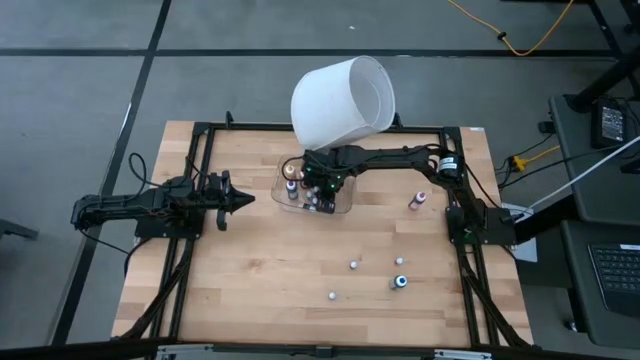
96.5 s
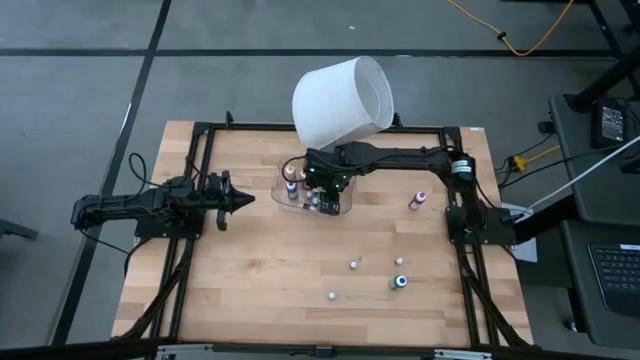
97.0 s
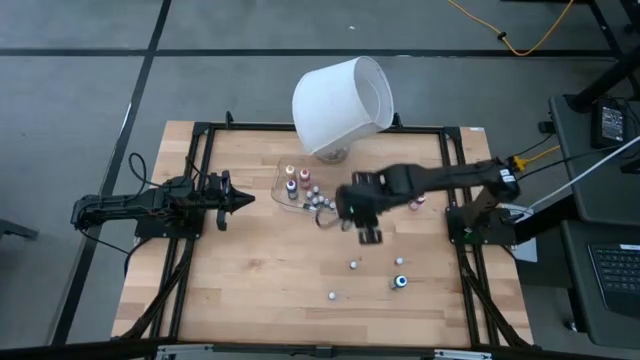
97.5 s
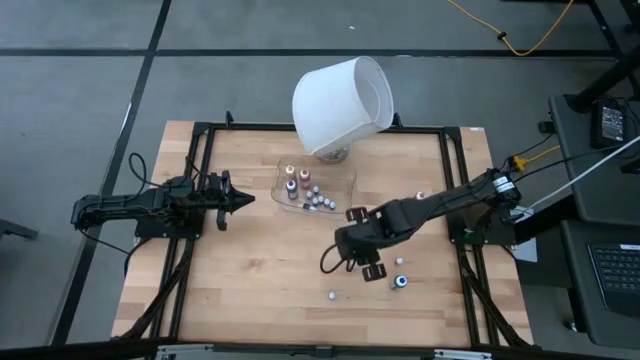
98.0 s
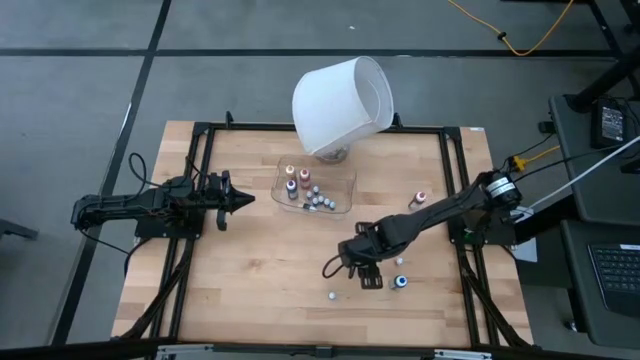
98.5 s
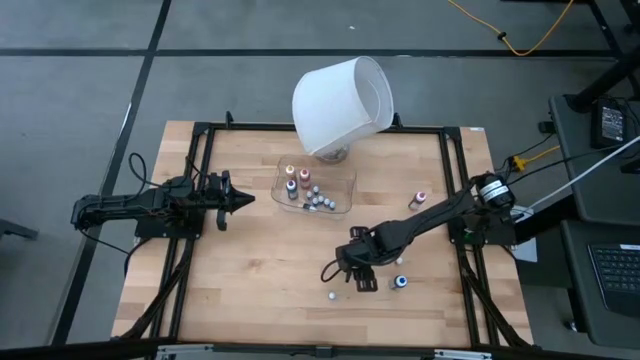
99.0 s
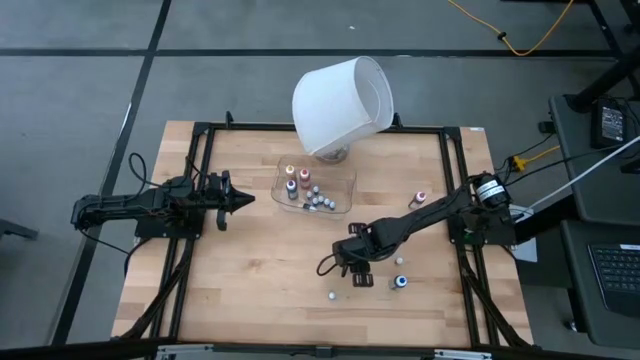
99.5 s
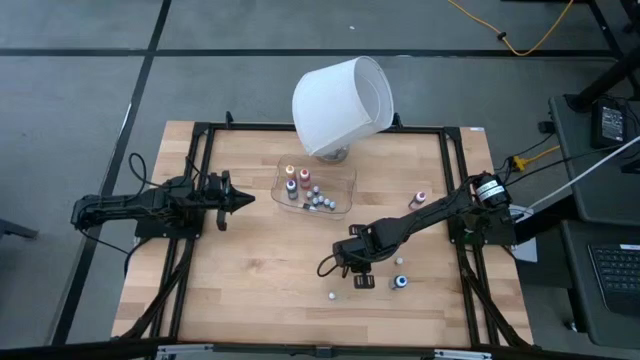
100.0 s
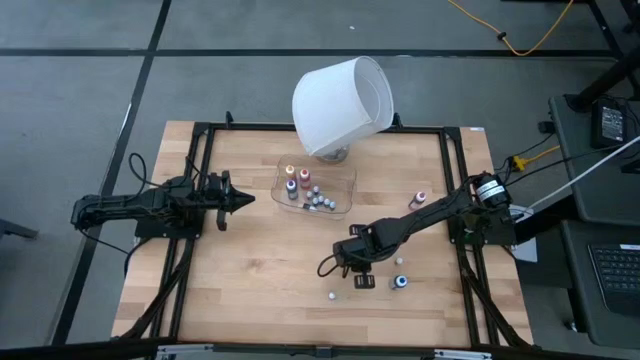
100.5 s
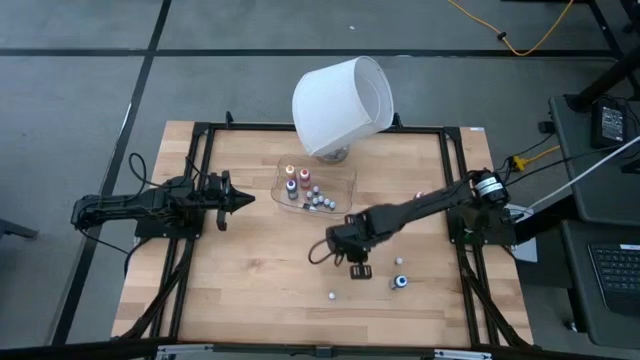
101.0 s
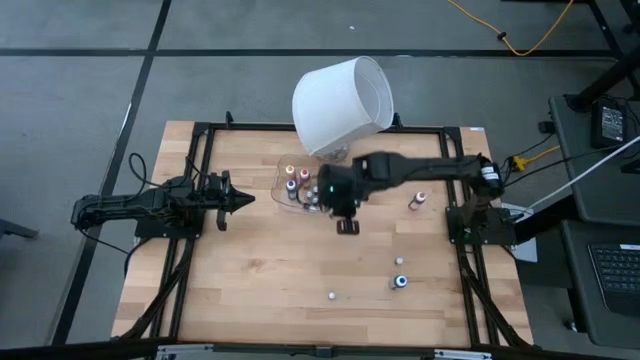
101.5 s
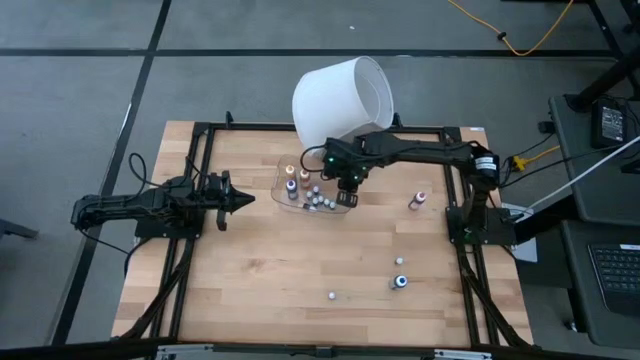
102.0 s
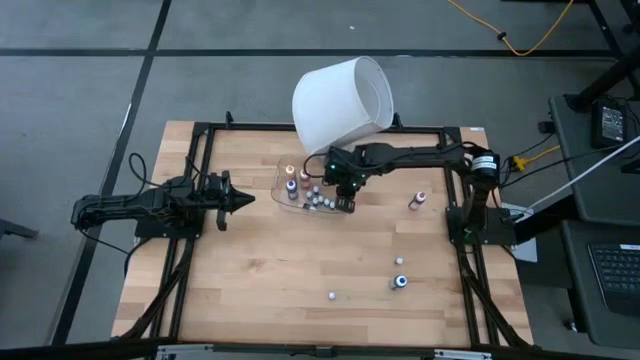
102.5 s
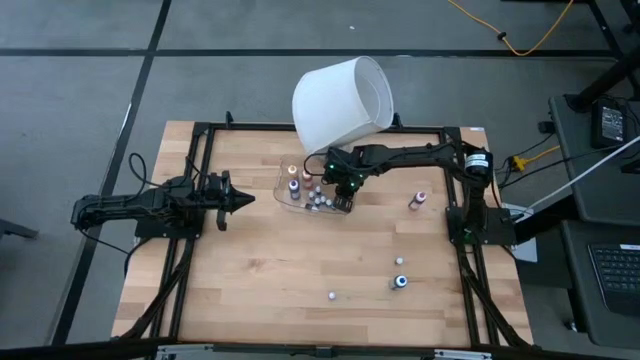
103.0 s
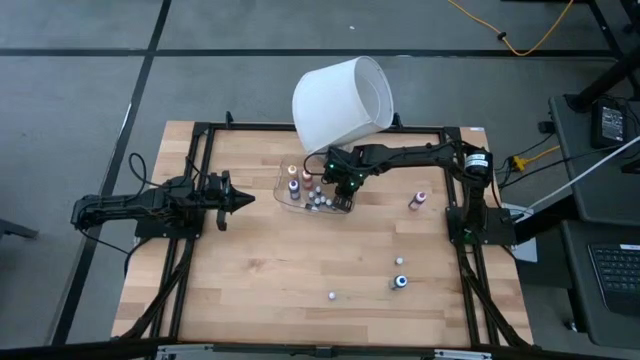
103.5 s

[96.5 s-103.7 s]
Task: Pick & Place food coloring
Put the left small red food coloring bottle into the container

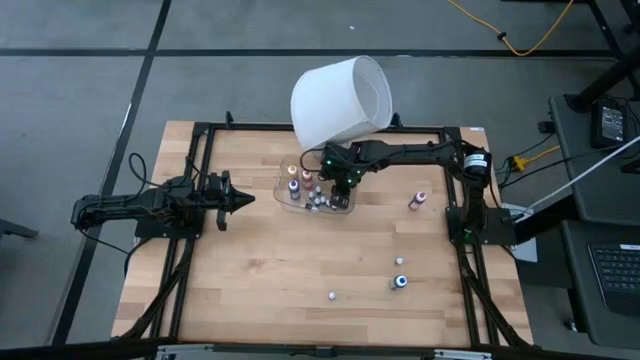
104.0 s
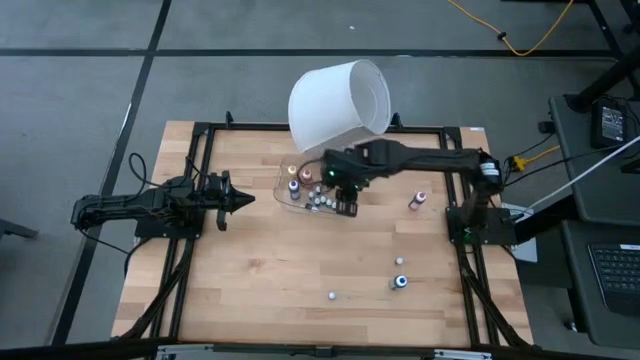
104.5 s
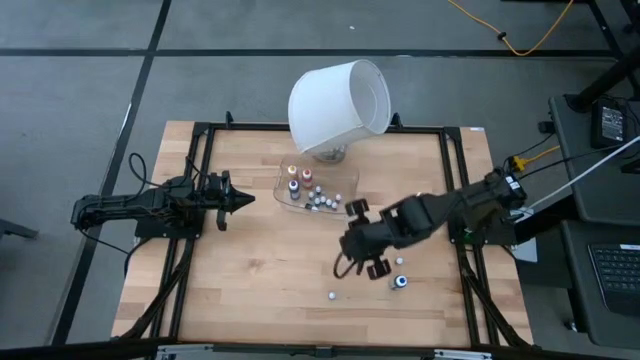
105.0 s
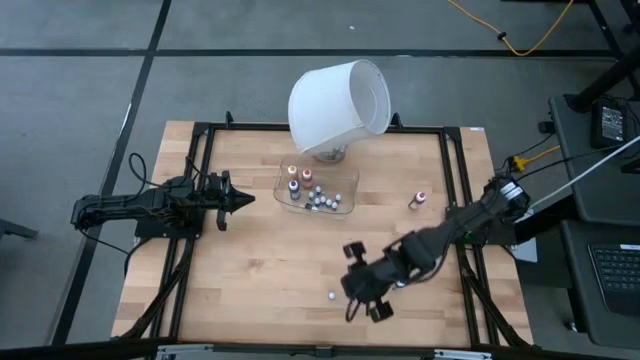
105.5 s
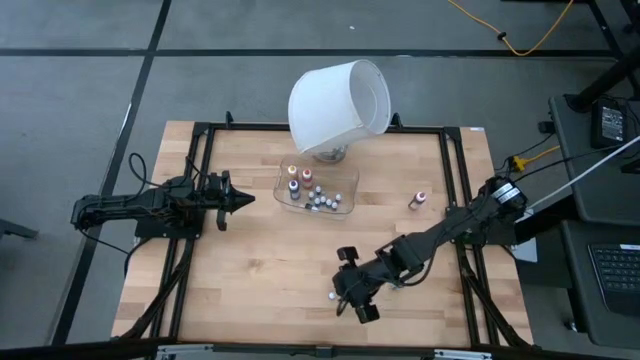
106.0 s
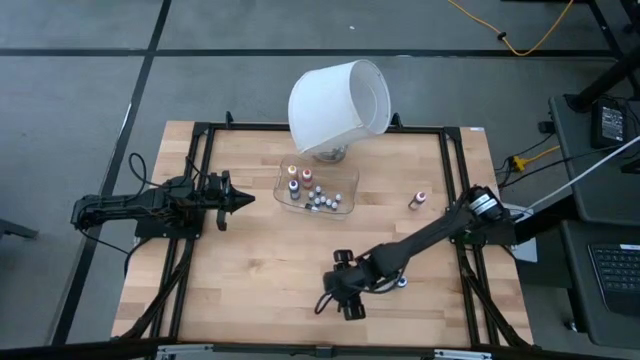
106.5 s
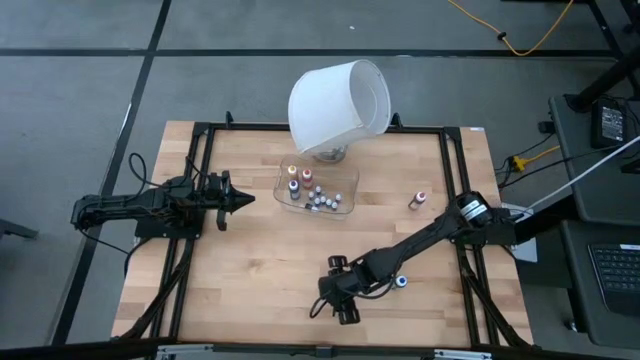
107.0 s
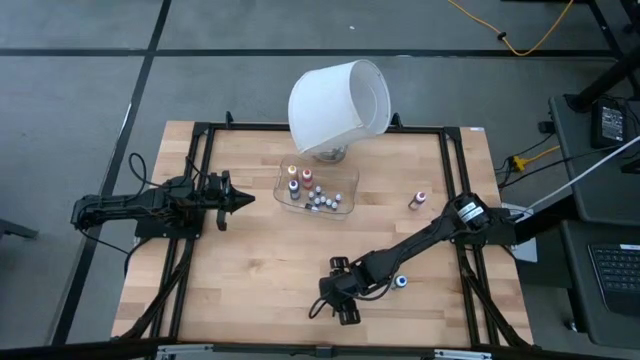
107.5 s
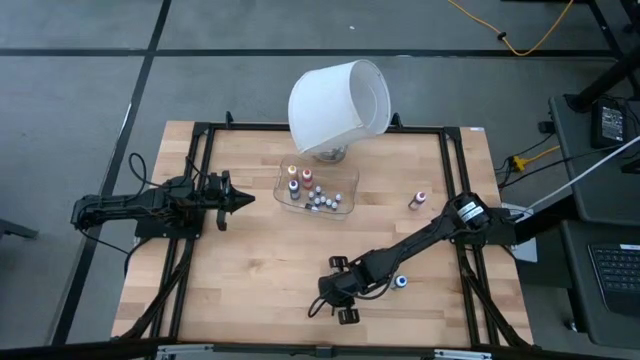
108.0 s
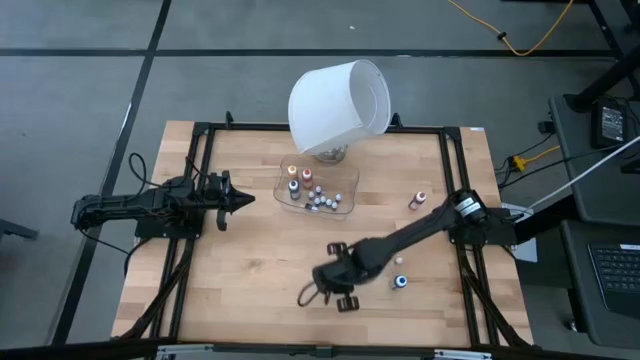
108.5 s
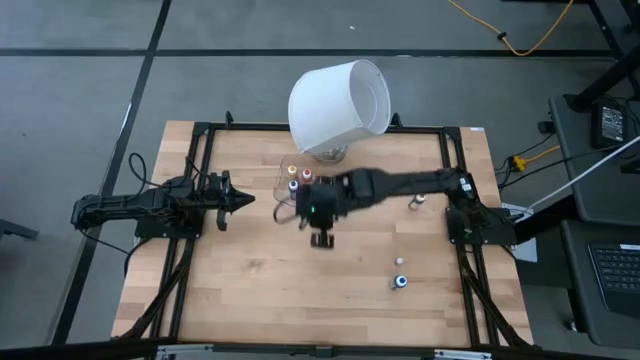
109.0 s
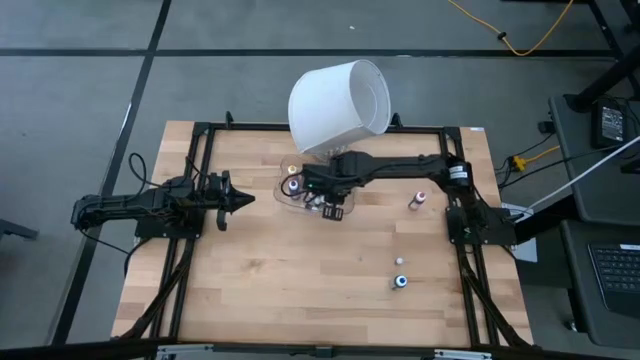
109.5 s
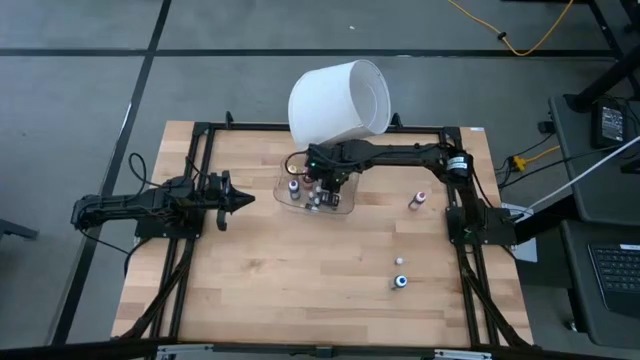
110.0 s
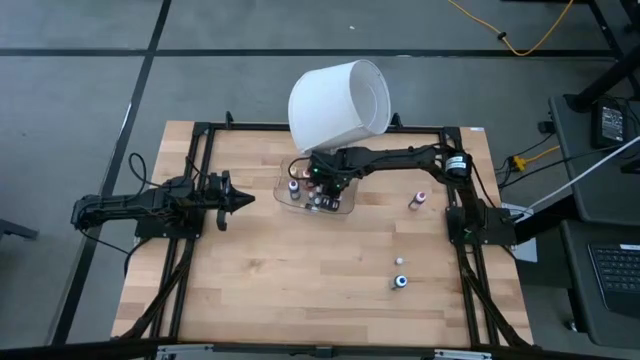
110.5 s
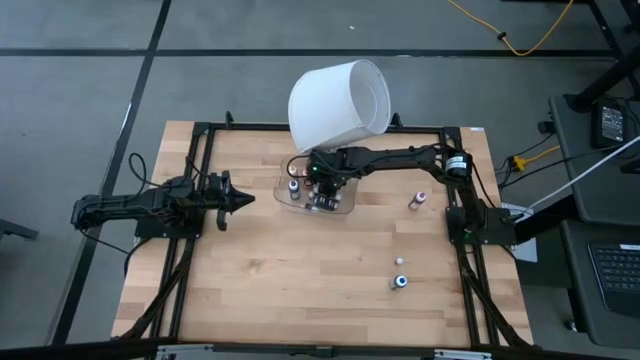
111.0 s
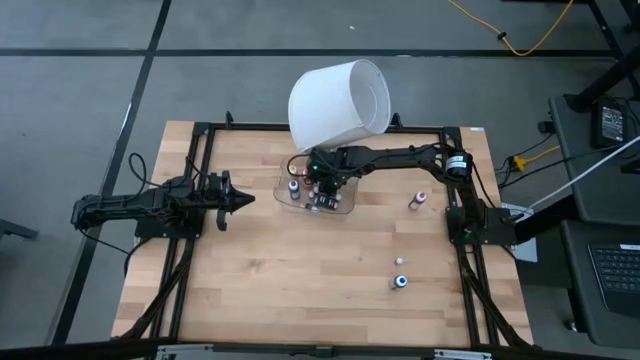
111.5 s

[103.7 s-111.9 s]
Put the small pink food coloring bottle into the container

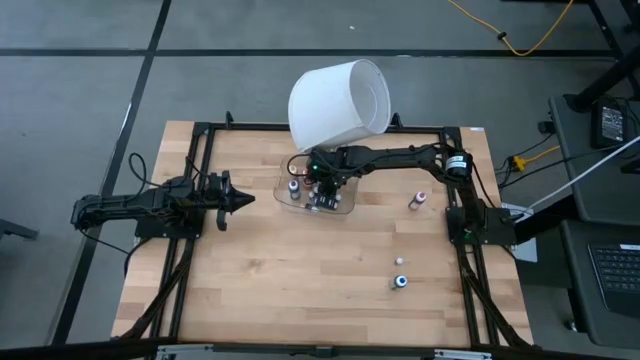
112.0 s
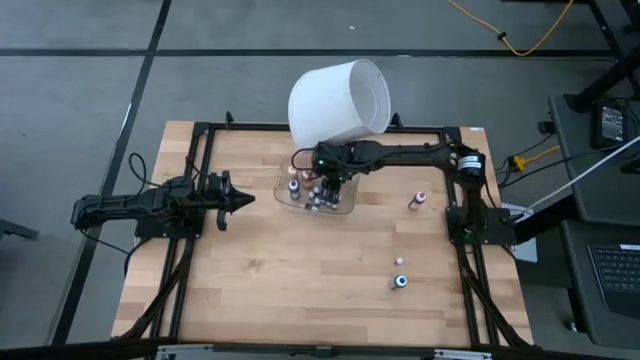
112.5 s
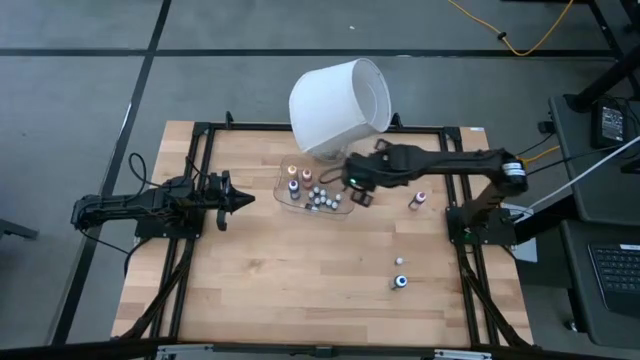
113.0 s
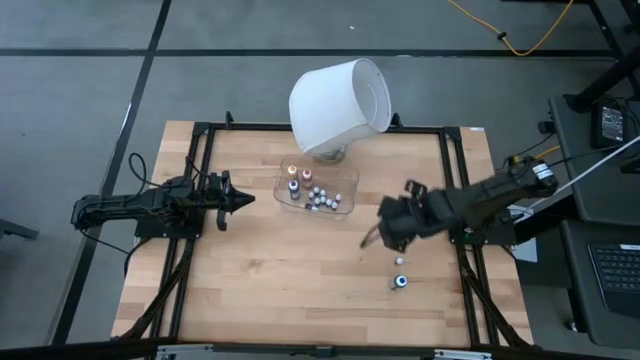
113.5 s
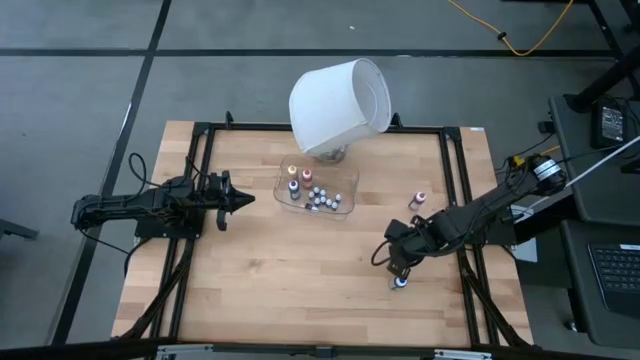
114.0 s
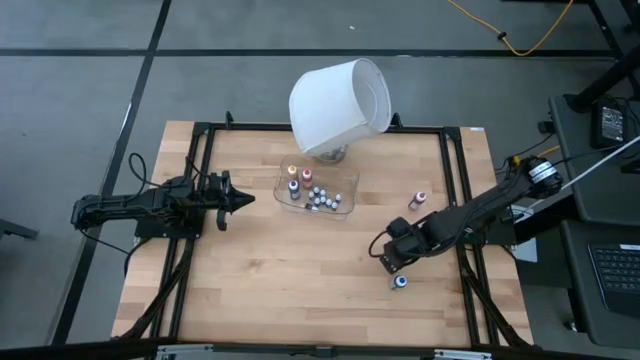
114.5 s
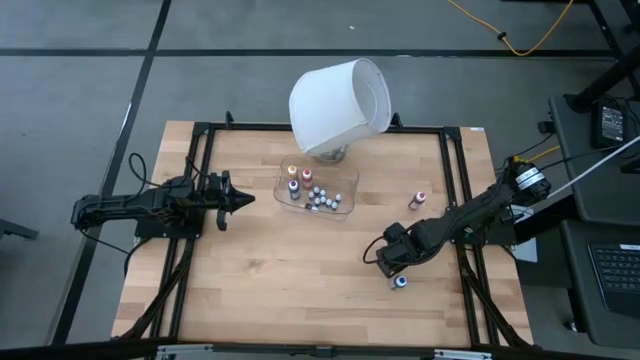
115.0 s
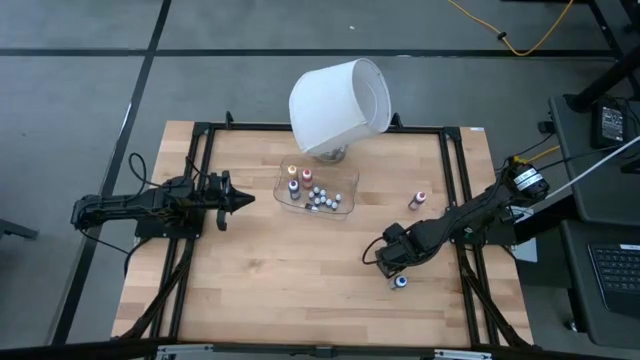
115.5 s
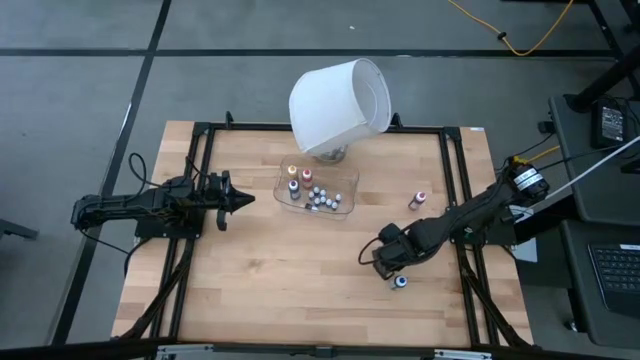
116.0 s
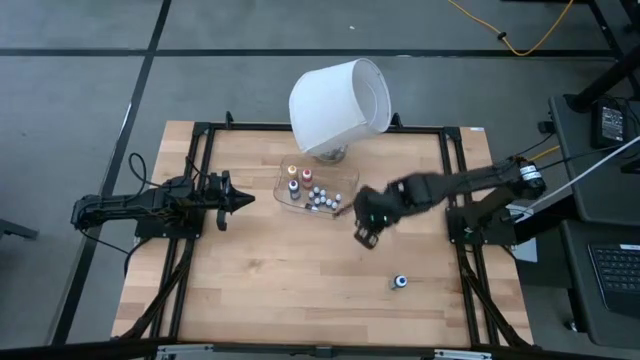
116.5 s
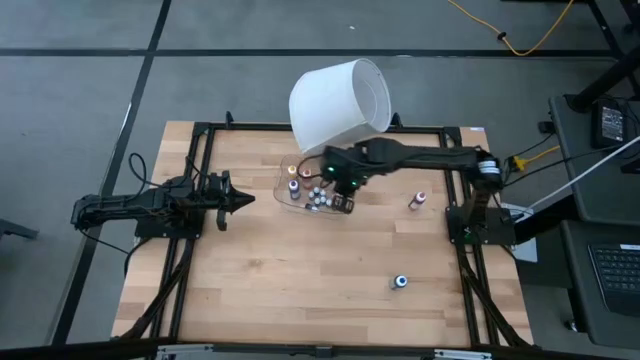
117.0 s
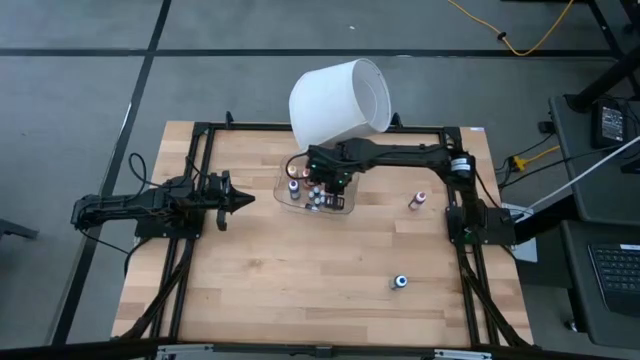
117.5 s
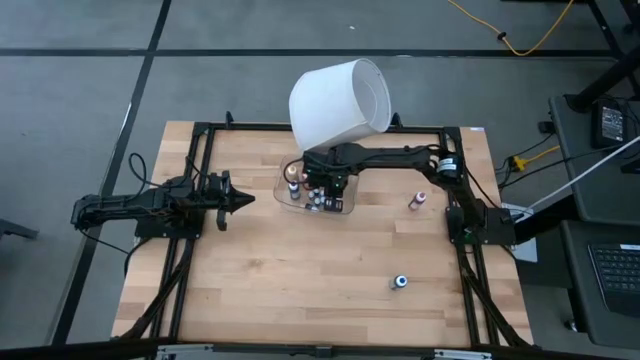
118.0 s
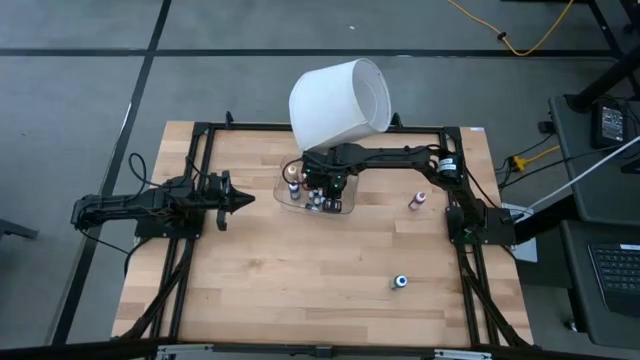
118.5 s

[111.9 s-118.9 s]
Put the small red food coloring bottle into the container
